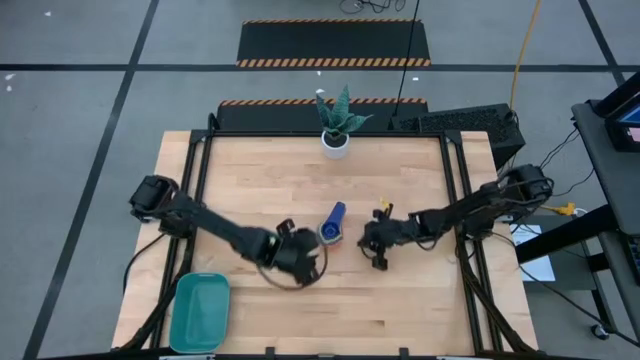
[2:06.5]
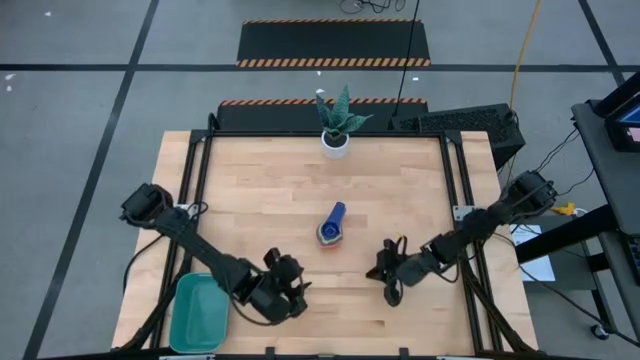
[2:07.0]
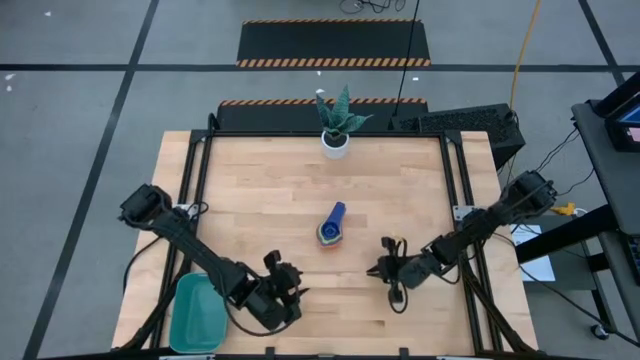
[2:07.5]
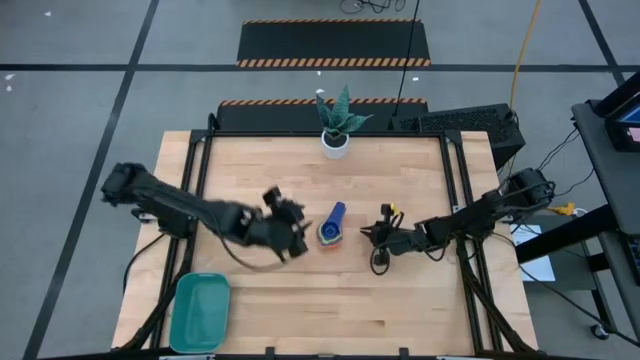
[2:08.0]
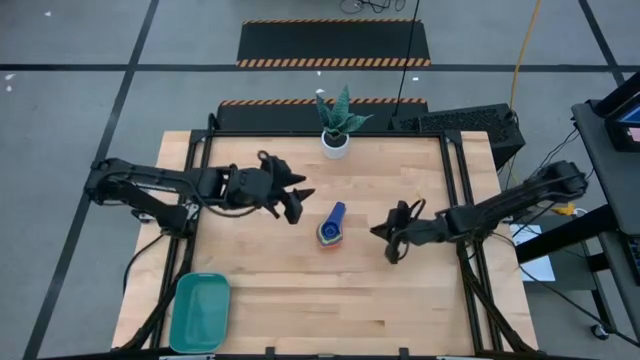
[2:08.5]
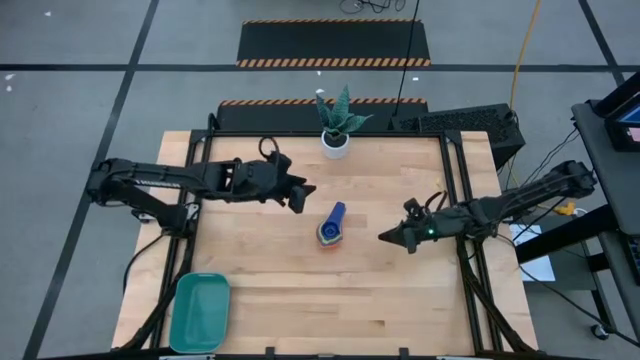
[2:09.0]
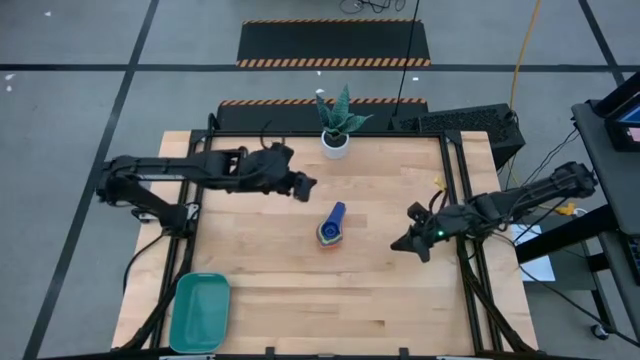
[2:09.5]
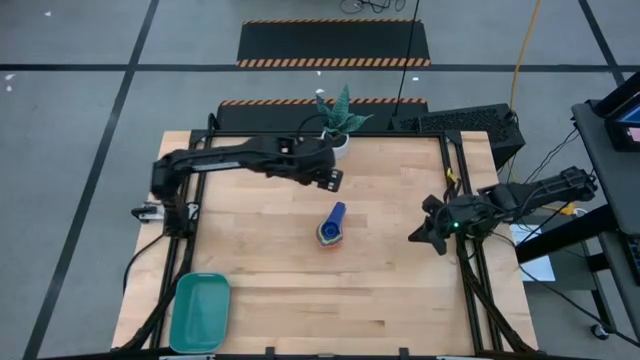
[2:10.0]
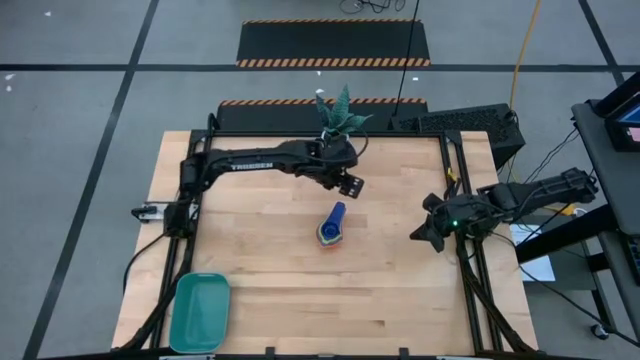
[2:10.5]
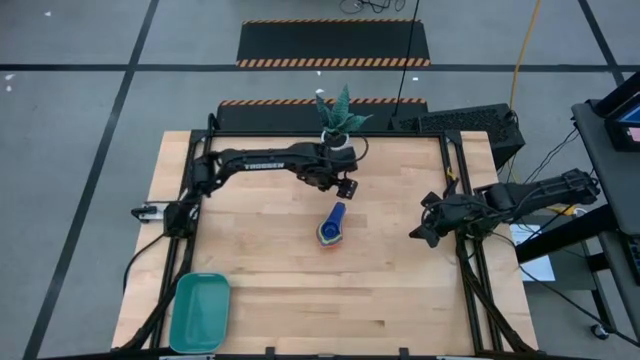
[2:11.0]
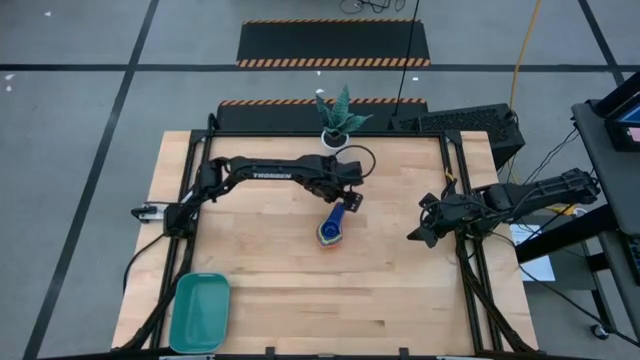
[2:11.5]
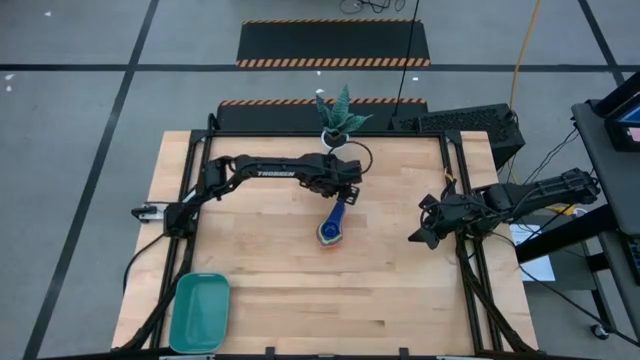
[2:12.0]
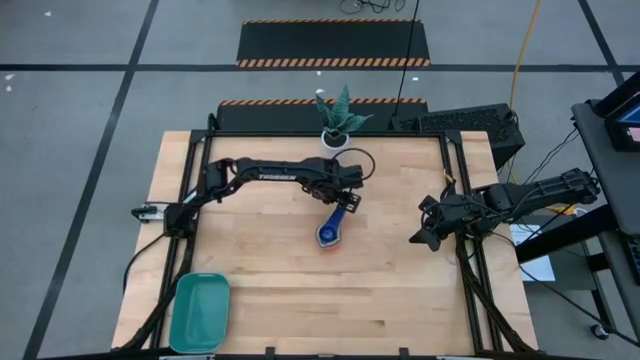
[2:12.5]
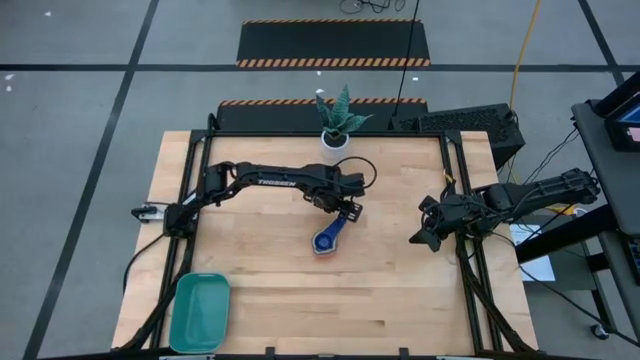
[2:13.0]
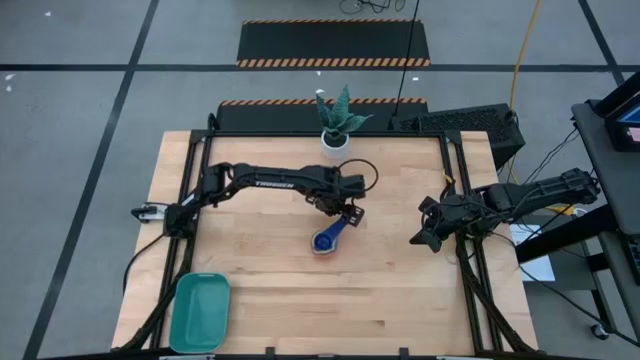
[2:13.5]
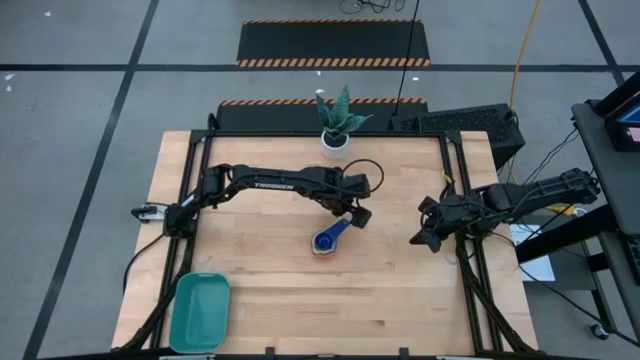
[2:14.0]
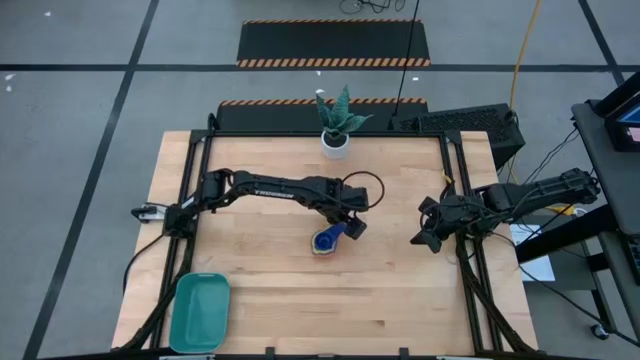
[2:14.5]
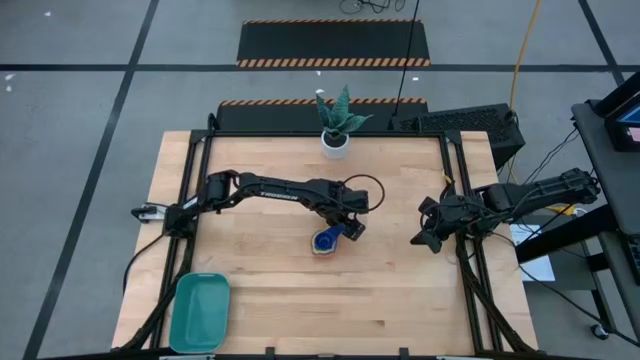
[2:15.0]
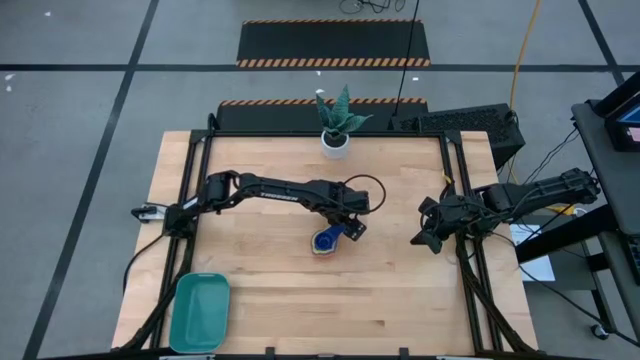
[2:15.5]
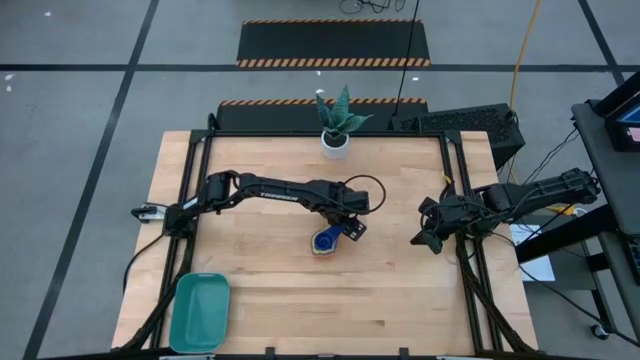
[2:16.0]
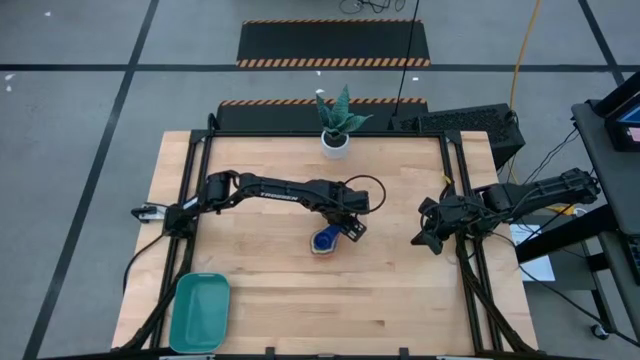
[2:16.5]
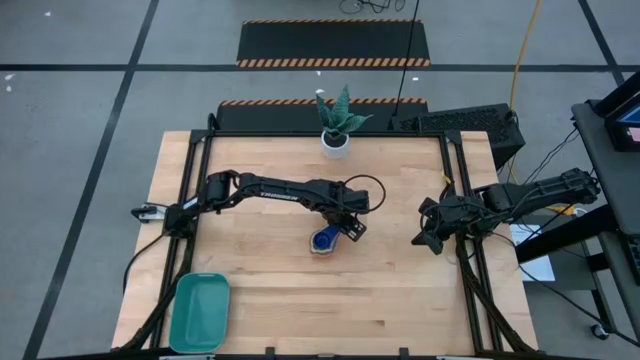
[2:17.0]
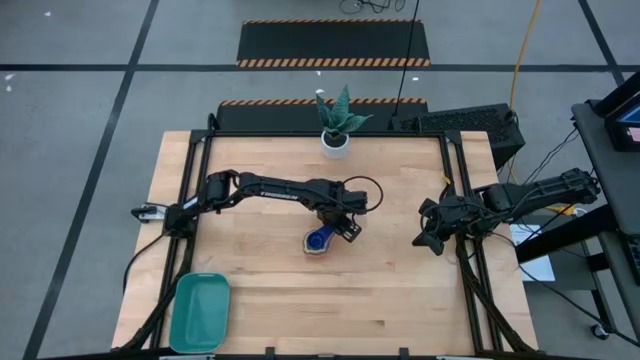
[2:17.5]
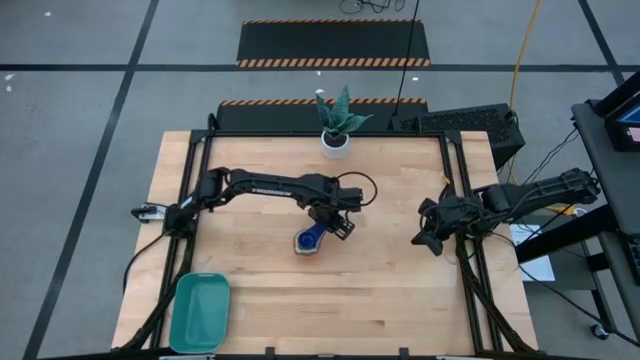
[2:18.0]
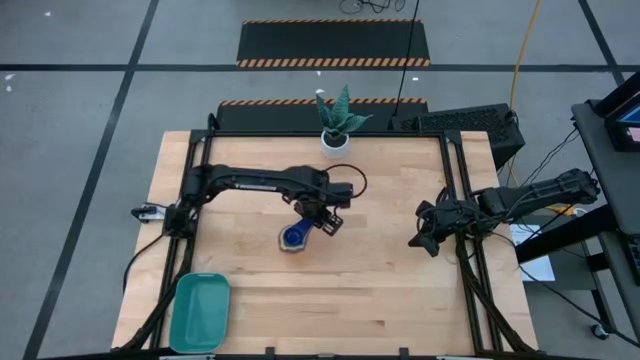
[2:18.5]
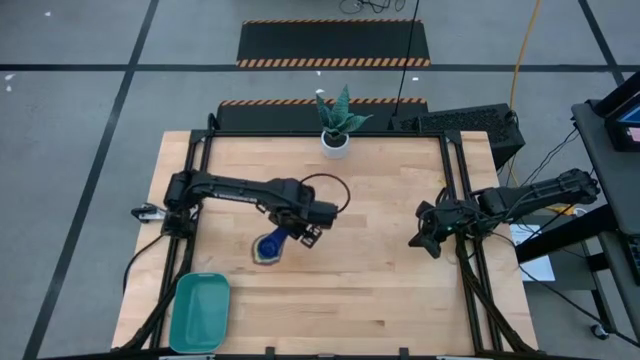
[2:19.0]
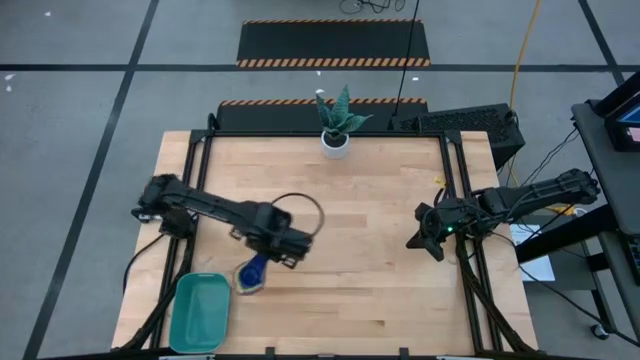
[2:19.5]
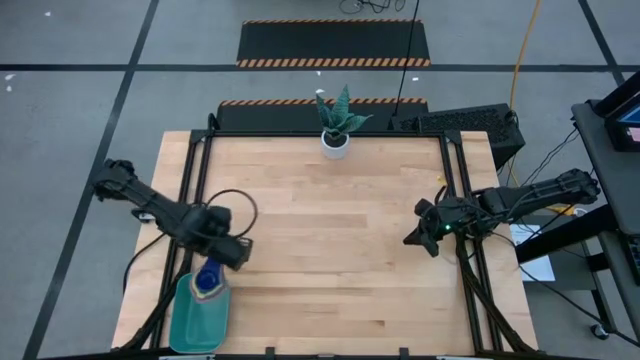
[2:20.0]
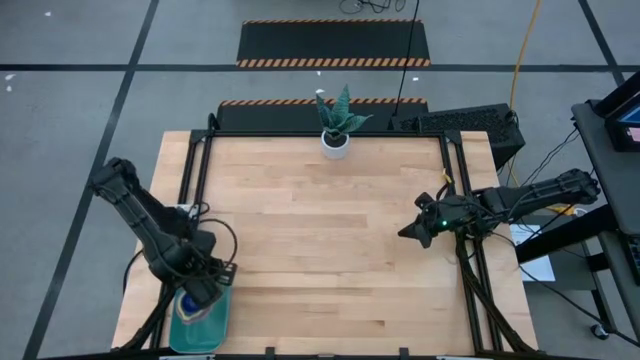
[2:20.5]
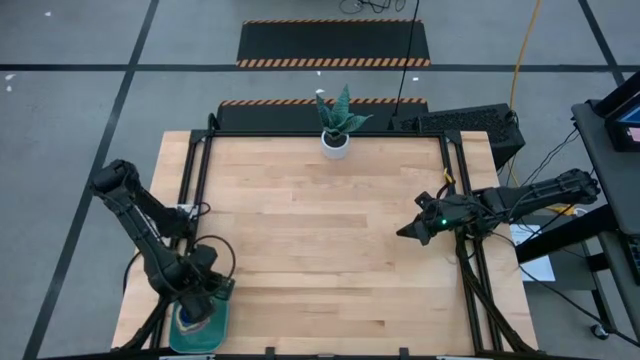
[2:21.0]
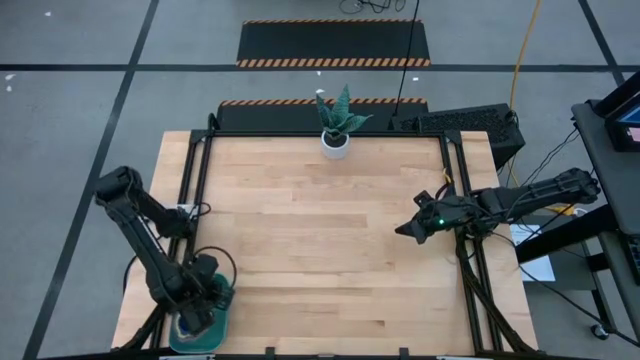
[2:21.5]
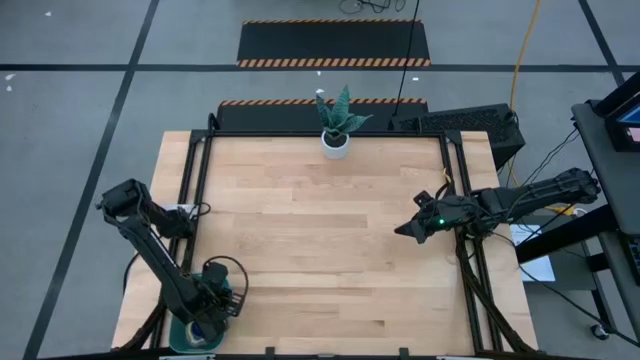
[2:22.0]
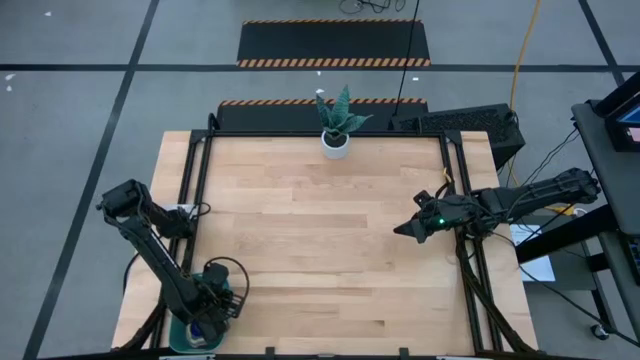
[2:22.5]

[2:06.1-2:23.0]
Task: Nest measuring cups in basket
Put the stacked measuring cups into the green bin

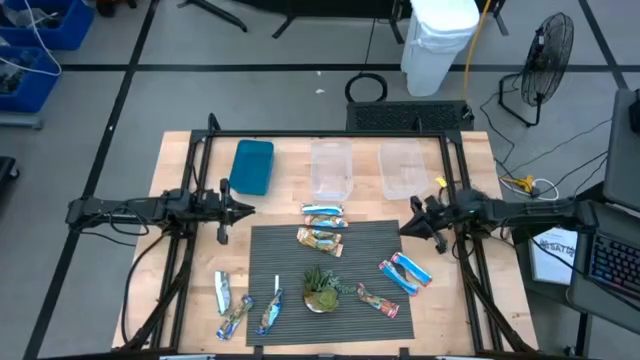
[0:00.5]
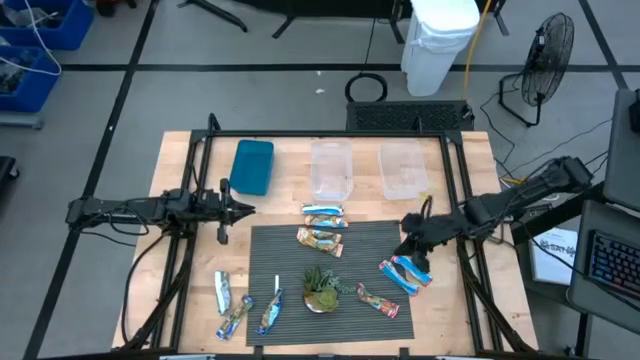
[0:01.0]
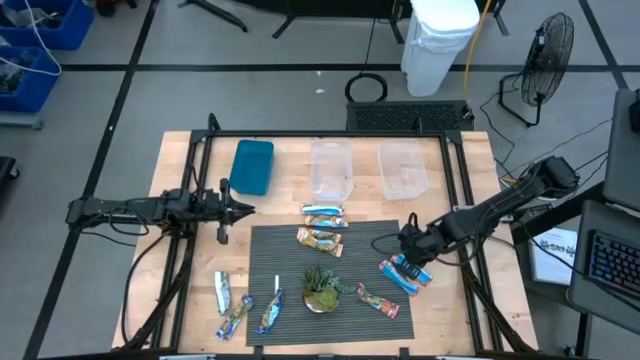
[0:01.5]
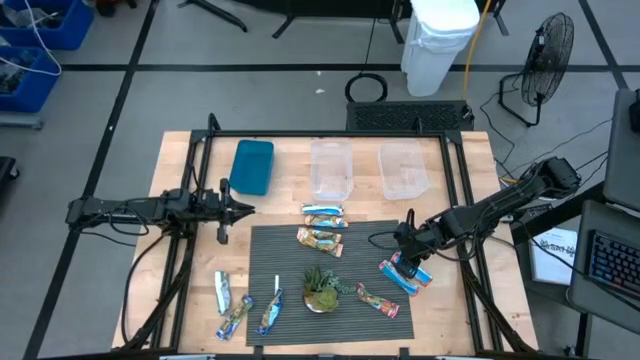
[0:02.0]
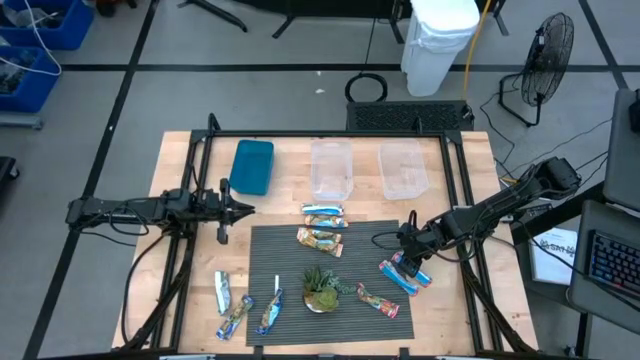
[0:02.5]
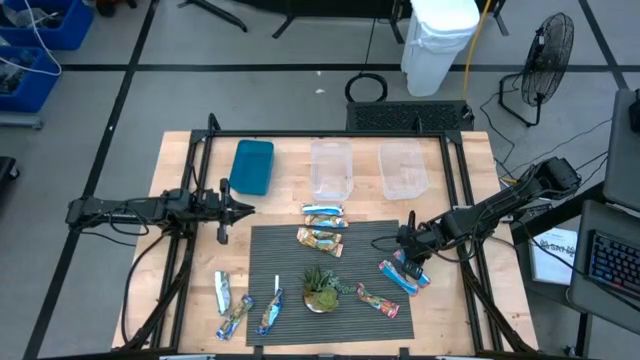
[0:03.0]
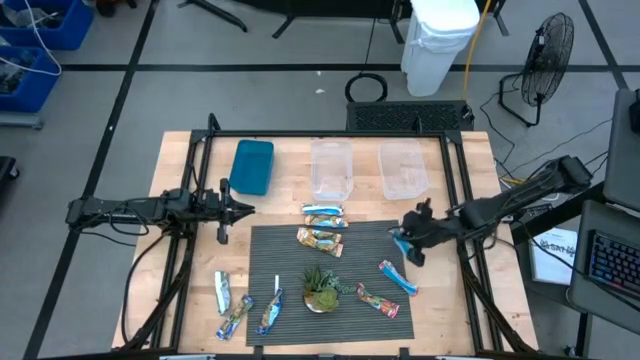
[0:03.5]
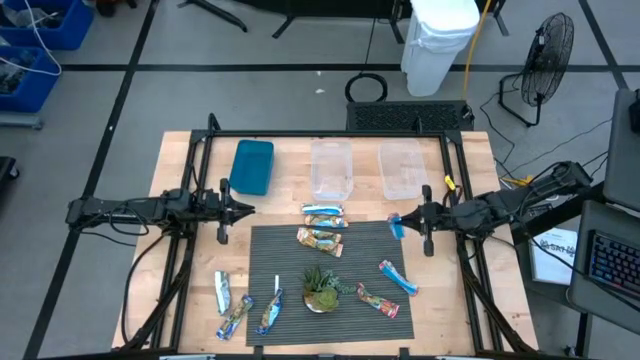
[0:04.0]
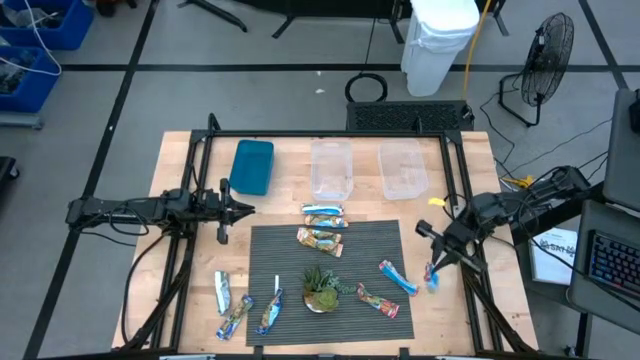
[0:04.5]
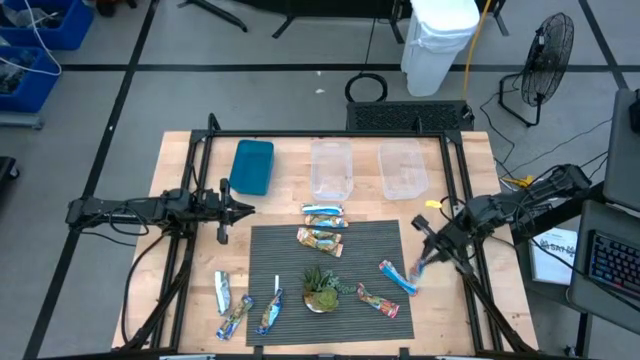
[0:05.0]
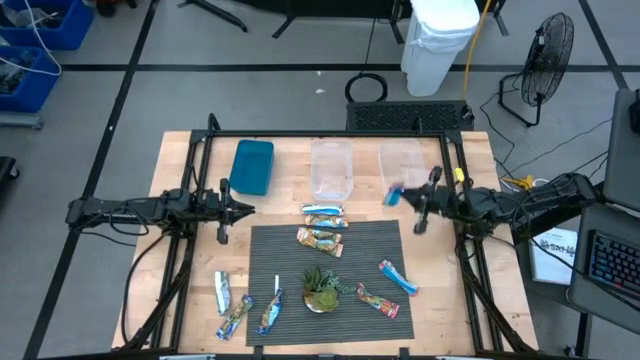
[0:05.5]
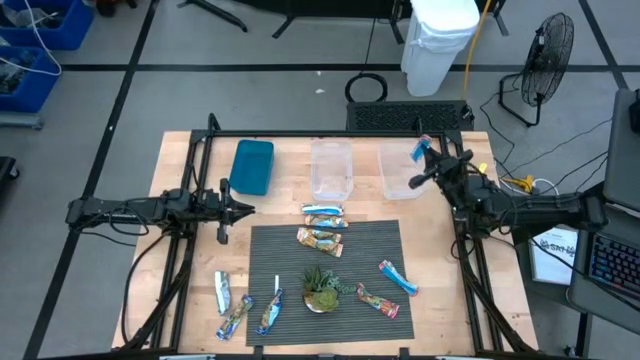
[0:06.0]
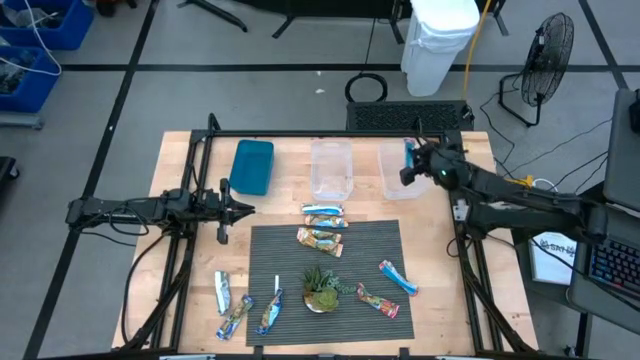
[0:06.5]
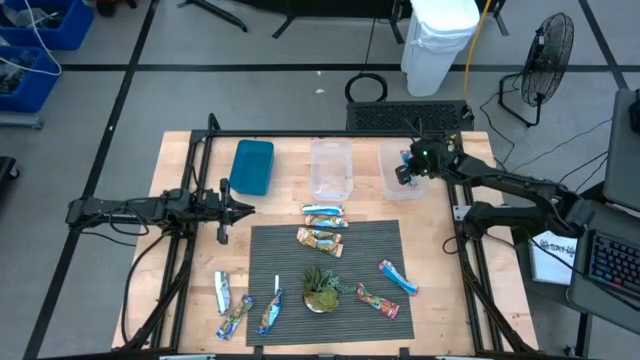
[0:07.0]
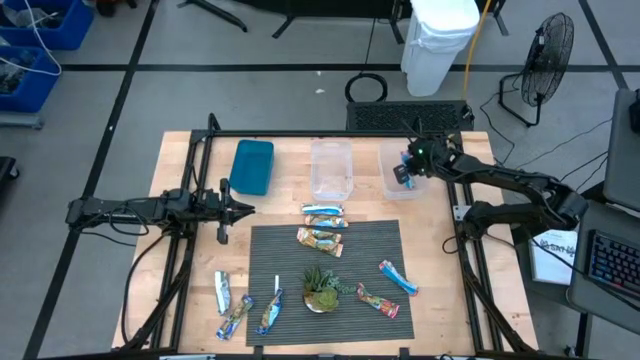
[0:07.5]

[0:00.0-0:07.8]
Task: Pick and place Granola Bars by type
Put the blue granola bar into the right transparent bin
